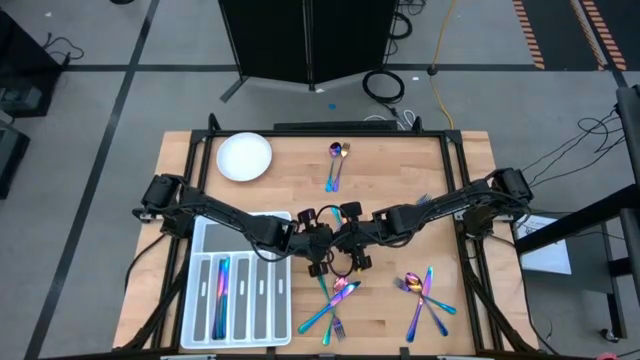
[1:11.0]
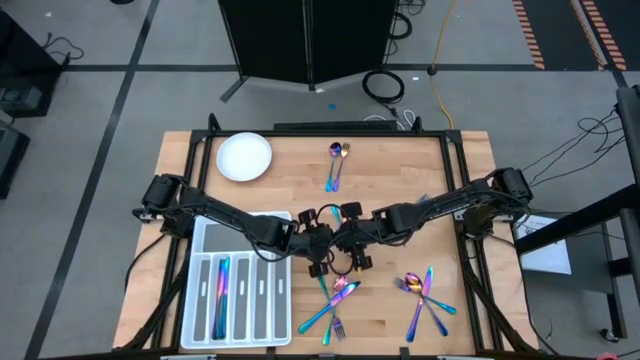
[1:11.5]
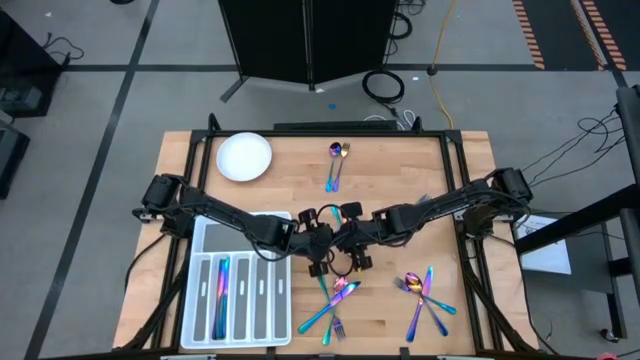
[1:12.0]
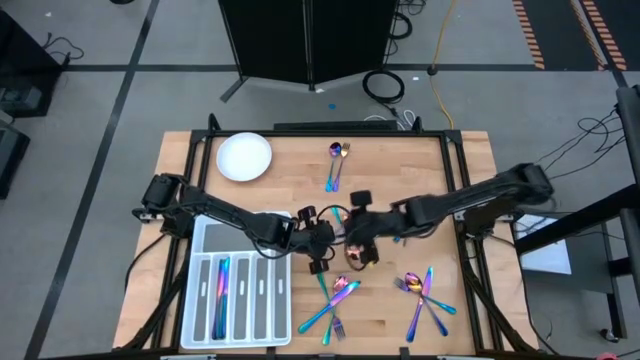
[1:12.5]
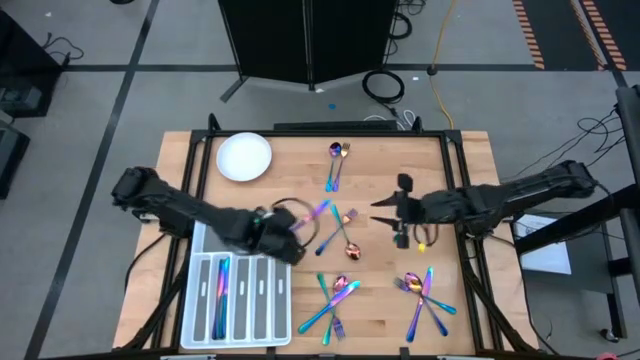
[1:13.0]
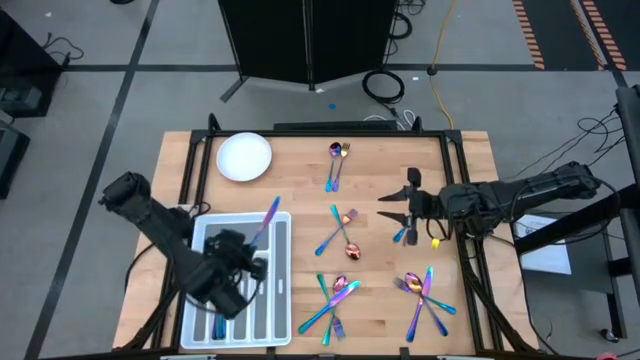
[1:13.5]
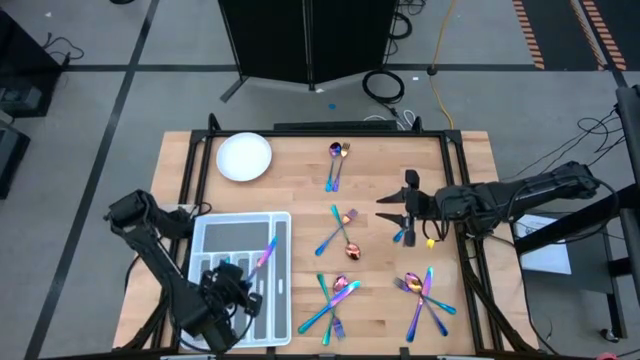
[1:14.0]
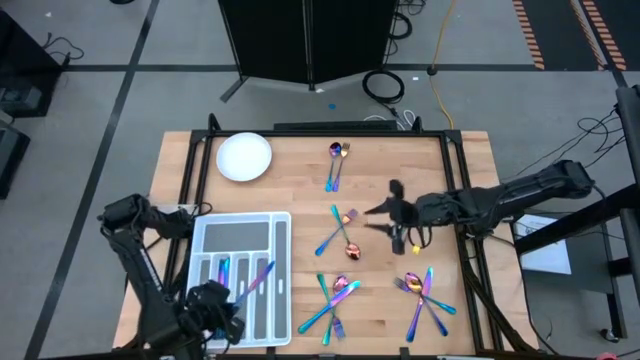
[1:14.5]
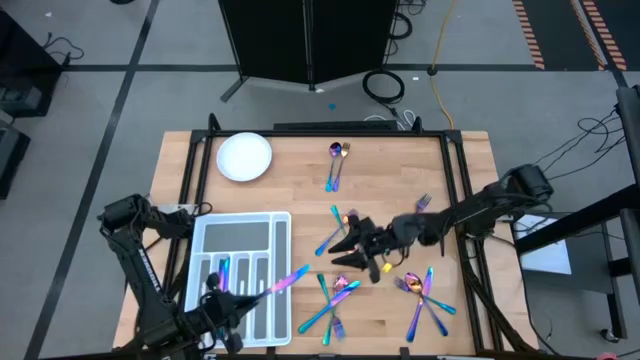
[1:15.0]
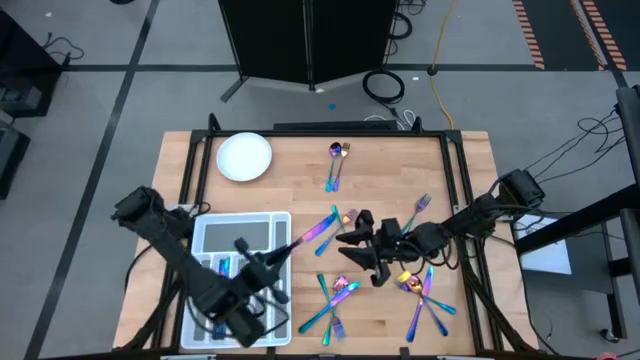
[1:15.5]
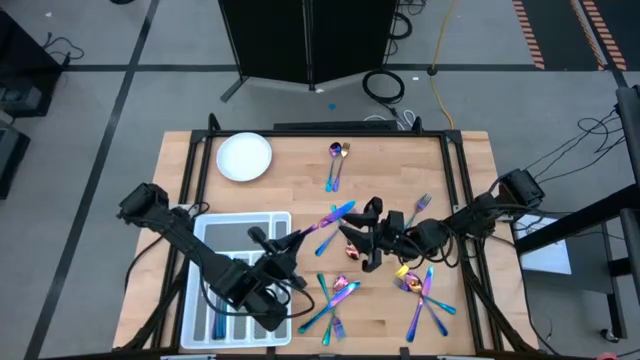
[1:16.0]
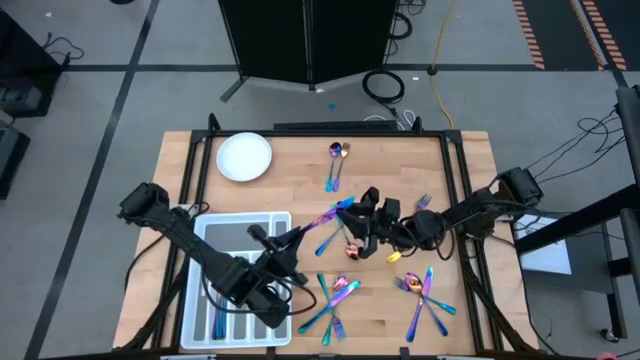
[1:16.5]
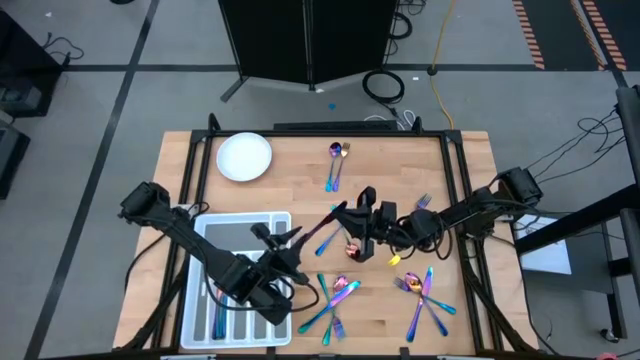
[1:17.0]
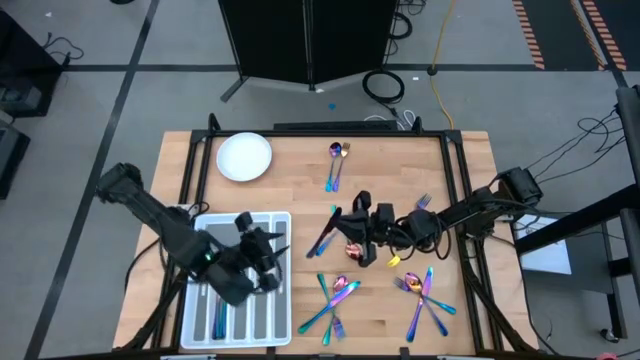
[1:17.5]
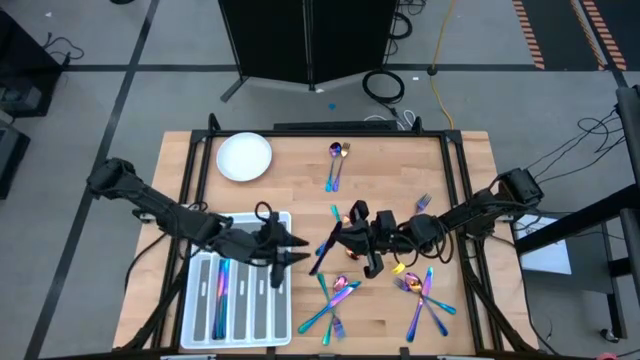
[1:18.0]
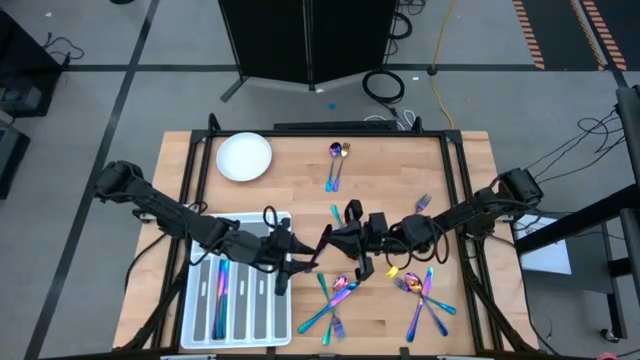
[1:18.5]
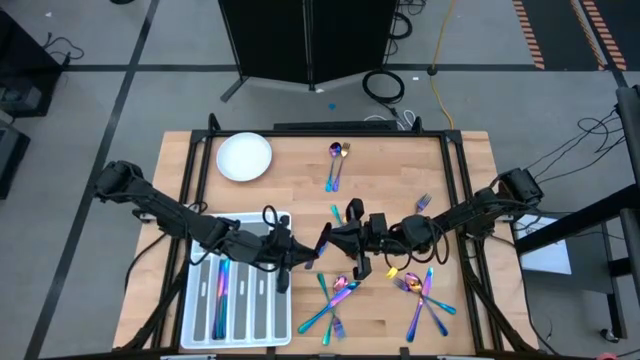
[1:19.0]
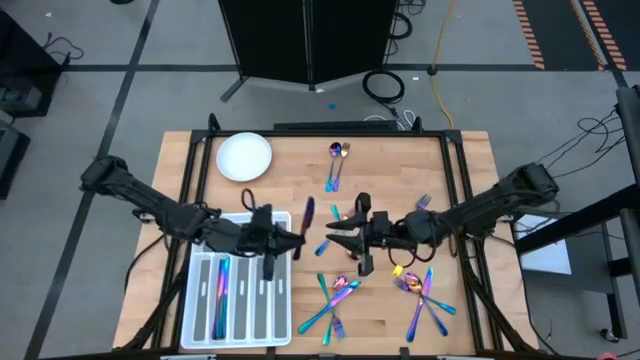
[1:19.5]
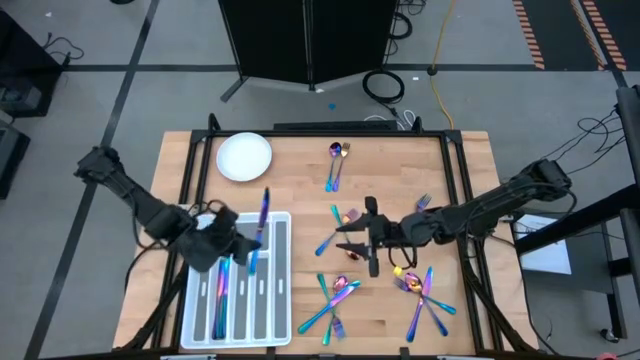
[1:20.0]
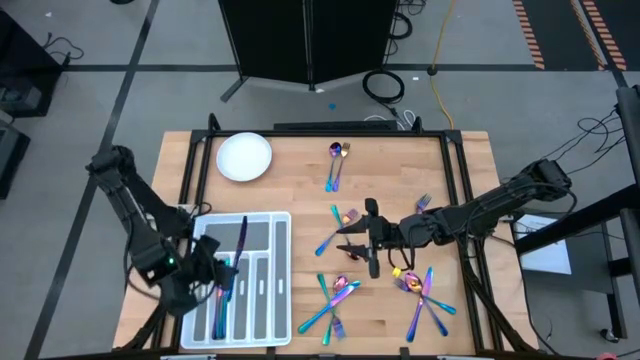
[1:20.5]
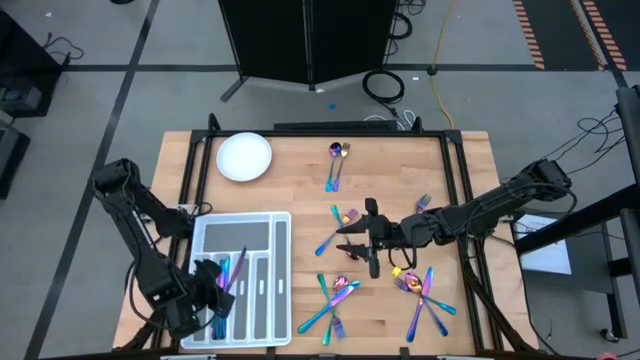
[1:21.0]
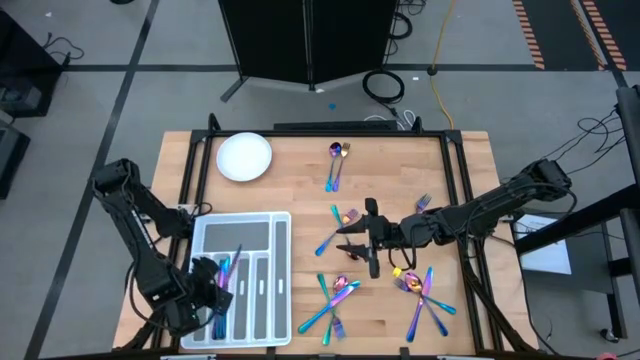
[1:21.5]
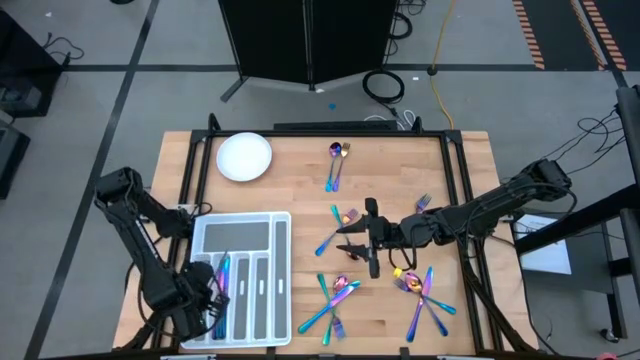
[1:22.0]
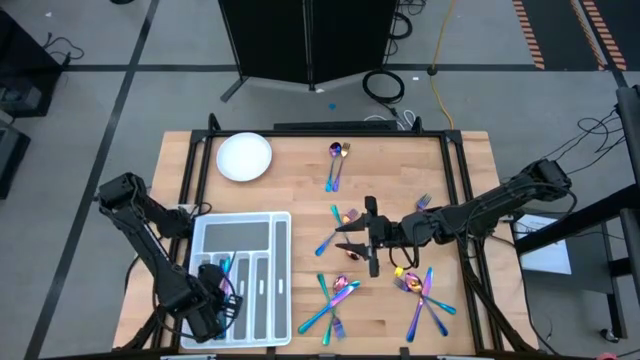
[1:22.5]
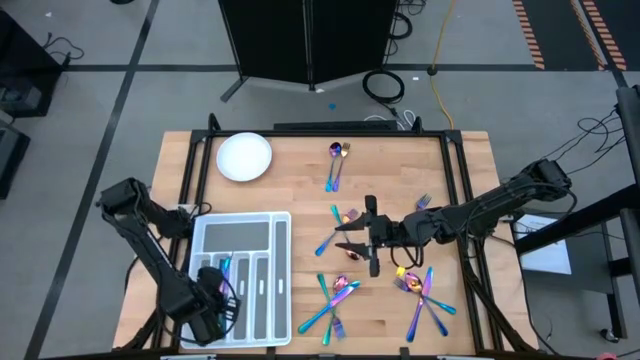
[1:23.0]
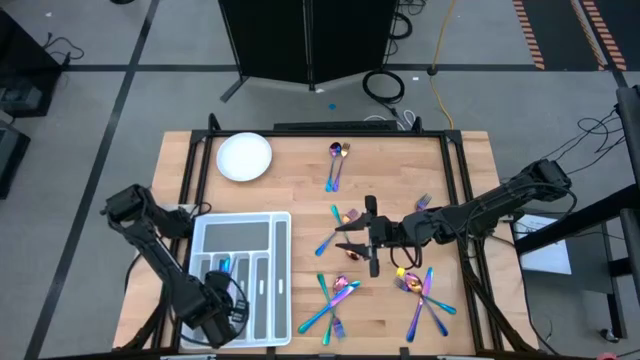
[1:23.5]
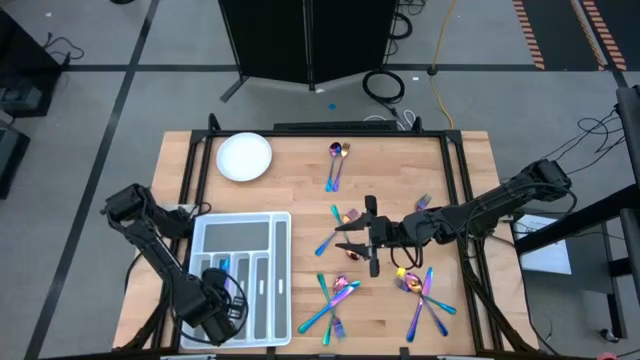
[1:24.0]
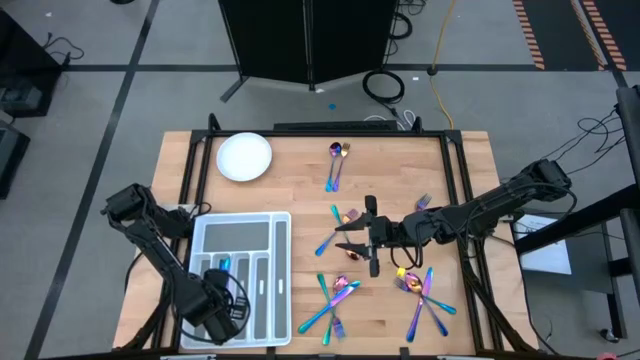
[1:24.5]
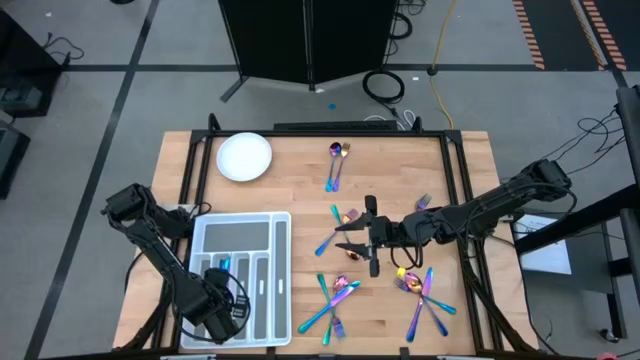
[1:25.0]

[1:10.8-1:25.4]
Task: Sort silverware
Put the iridescent blue knife in the silverware tray

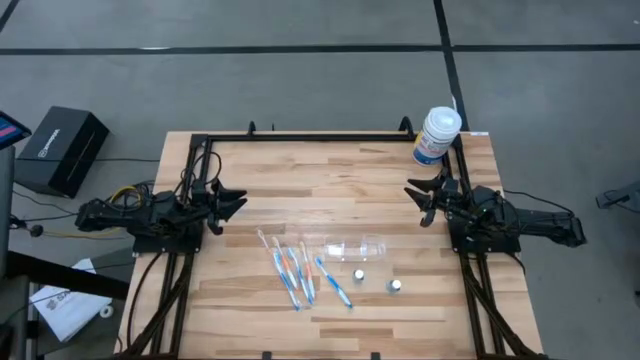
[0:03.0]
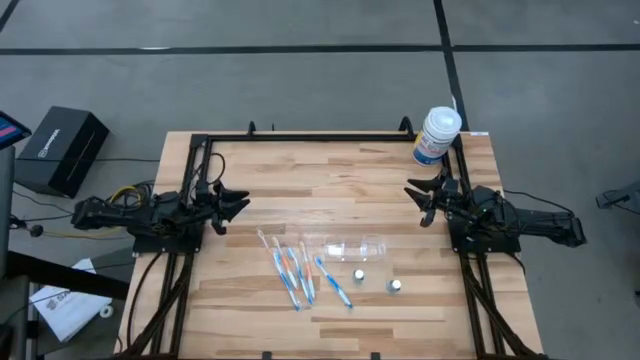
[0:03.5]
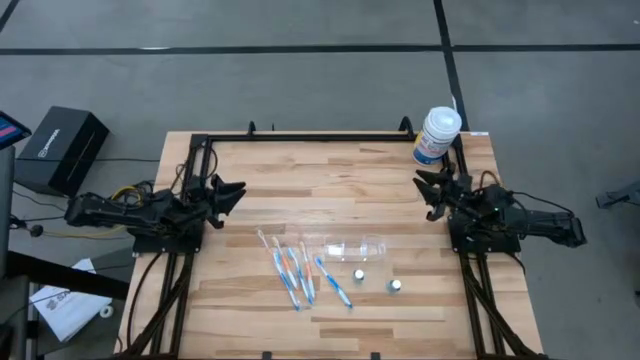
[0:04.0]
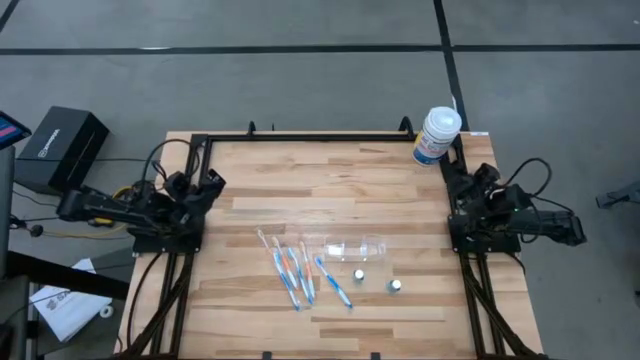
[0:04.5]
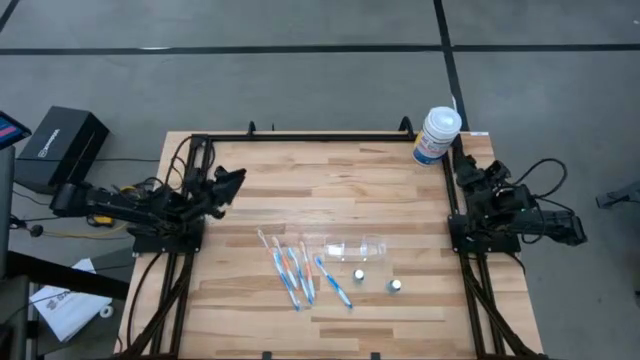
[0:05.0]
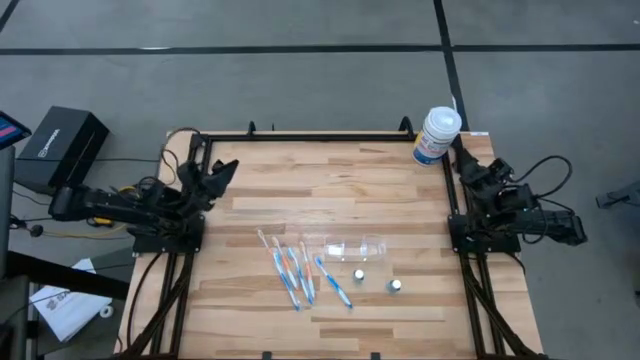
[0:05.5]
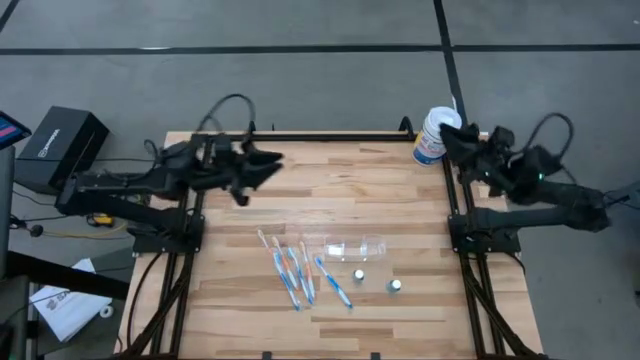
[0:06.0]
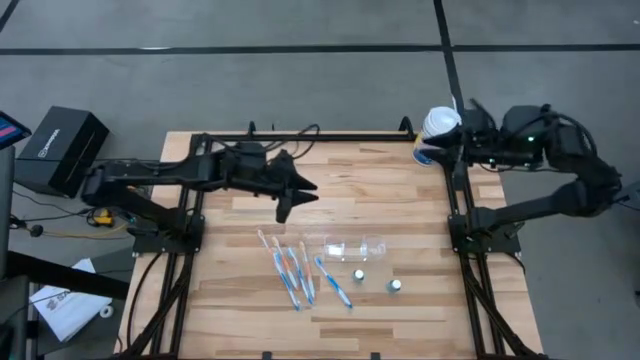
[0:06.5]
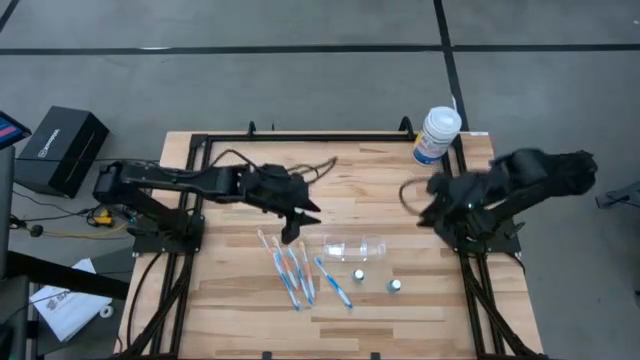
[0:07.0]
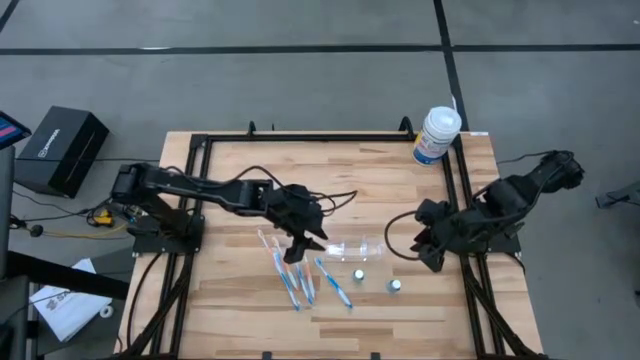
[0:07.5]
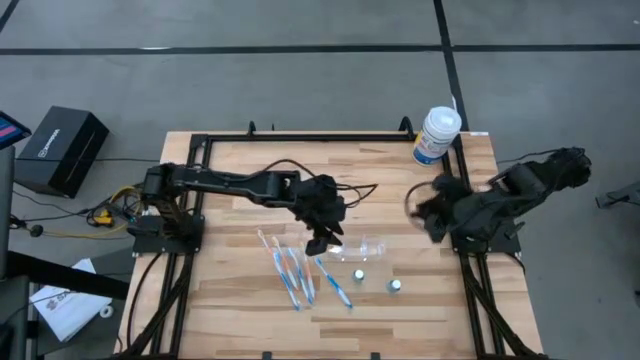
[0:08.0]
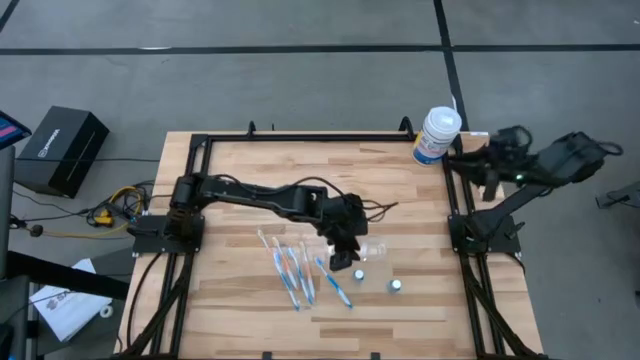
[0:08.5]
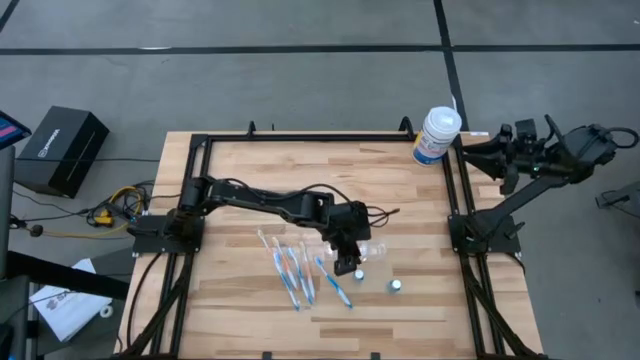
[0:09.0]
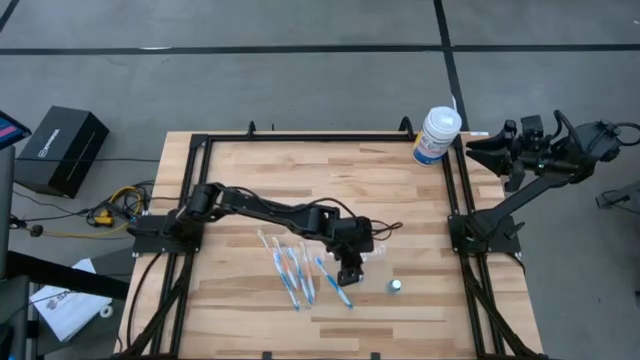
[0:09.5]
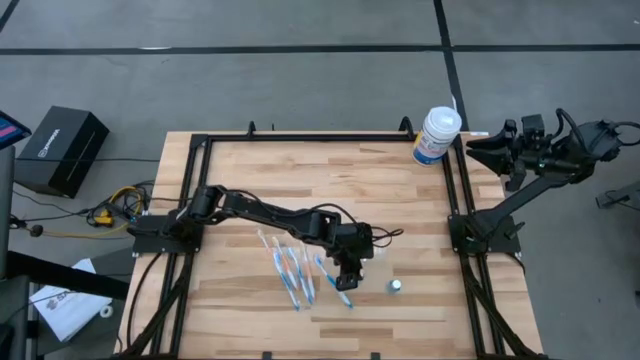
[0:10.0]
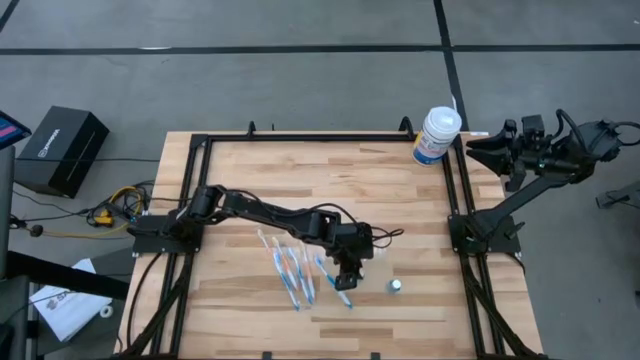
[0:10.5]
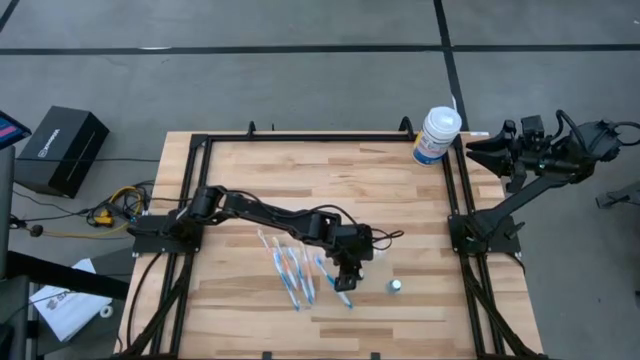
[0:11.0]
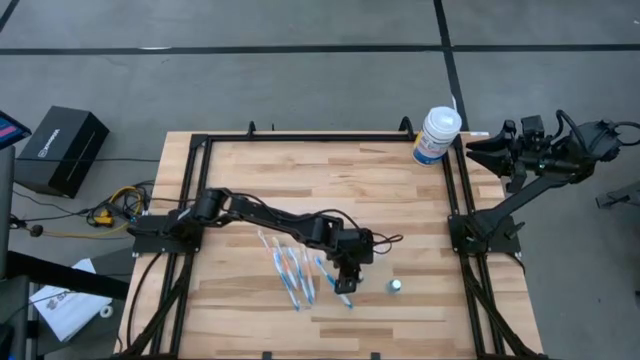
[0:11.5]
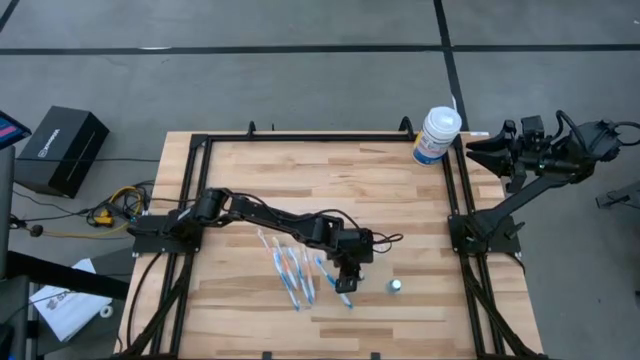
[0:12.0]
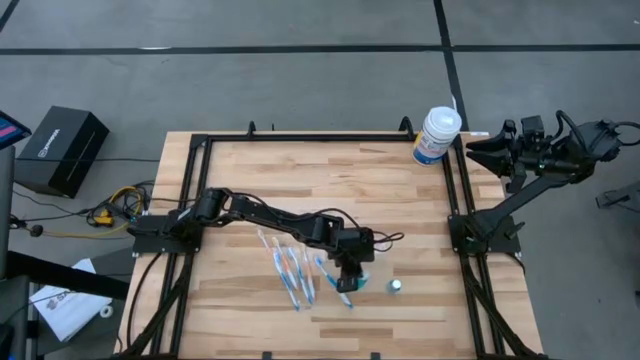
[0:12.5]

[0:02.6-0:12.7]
Task: Pick & Place toothbrushing station
Put the left blue mouthwash into the transparent organizer
